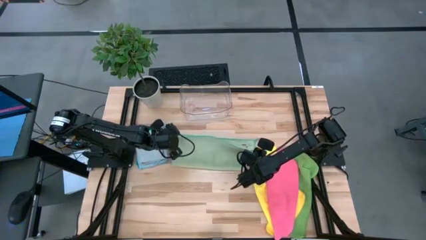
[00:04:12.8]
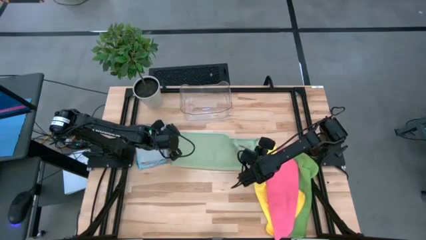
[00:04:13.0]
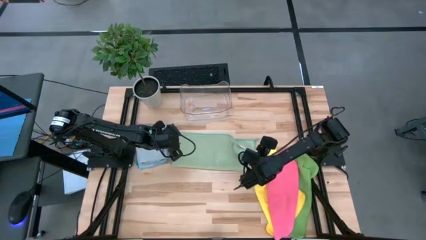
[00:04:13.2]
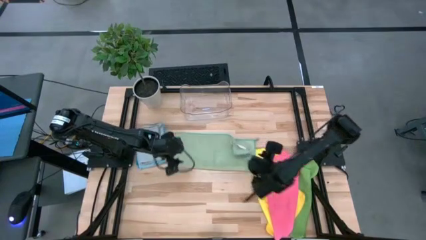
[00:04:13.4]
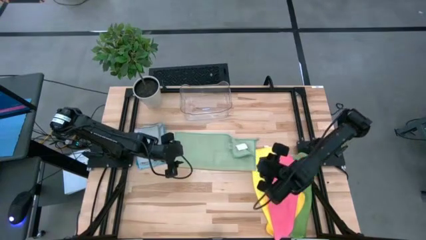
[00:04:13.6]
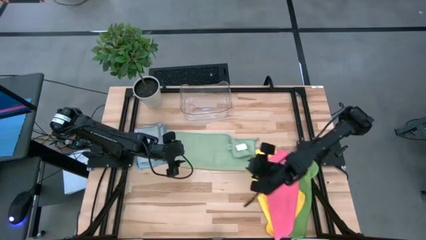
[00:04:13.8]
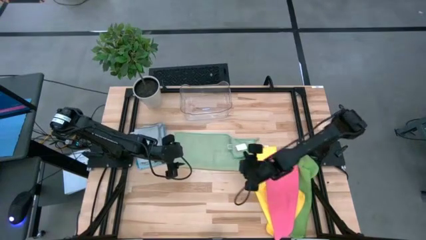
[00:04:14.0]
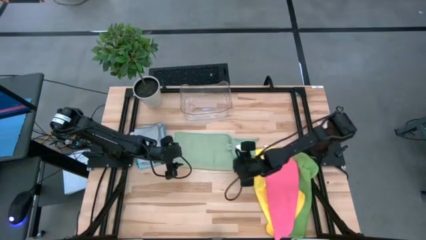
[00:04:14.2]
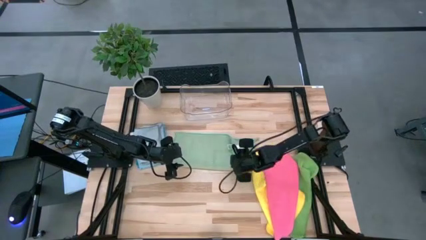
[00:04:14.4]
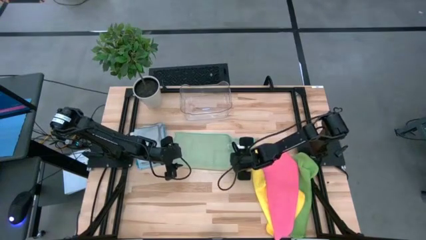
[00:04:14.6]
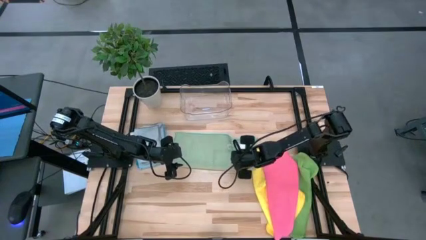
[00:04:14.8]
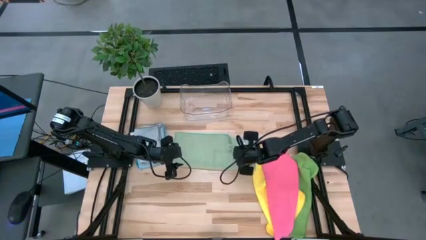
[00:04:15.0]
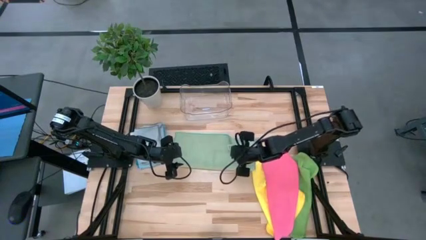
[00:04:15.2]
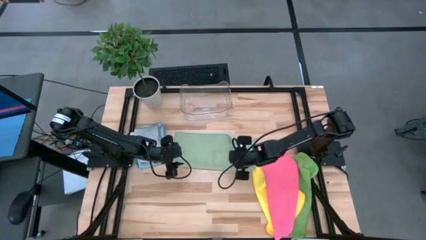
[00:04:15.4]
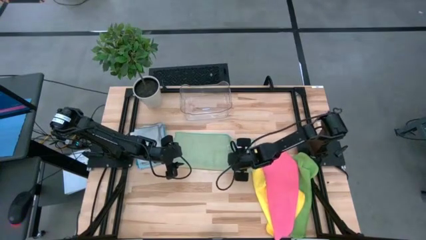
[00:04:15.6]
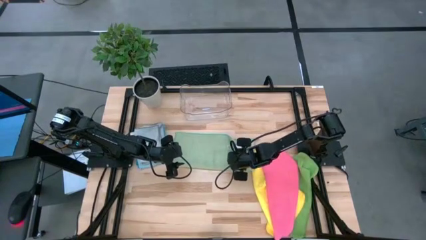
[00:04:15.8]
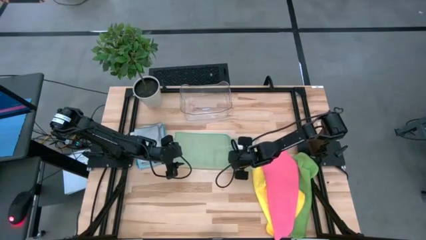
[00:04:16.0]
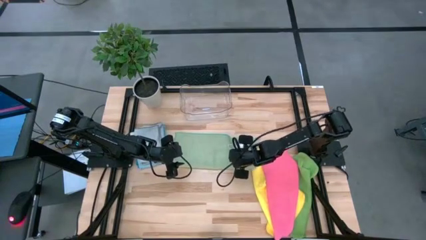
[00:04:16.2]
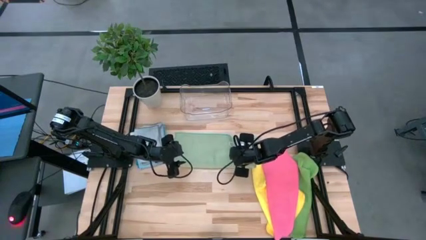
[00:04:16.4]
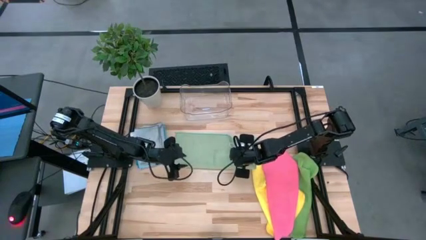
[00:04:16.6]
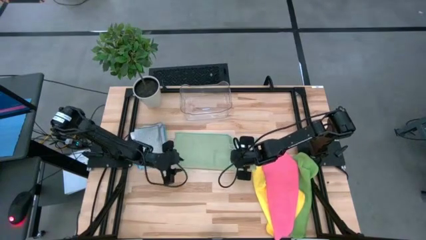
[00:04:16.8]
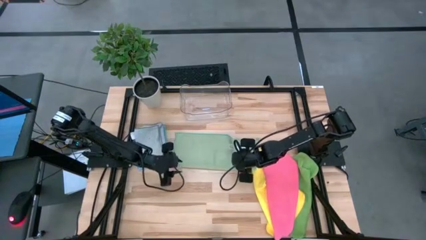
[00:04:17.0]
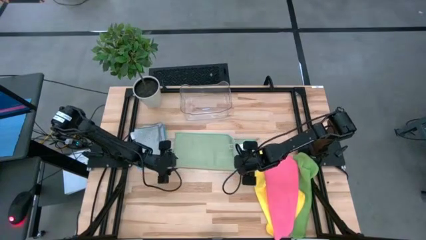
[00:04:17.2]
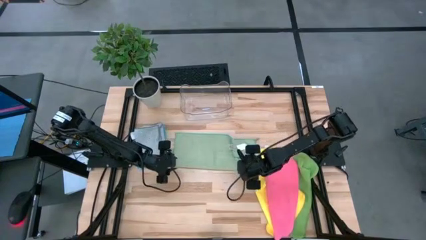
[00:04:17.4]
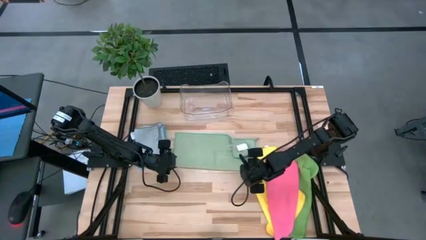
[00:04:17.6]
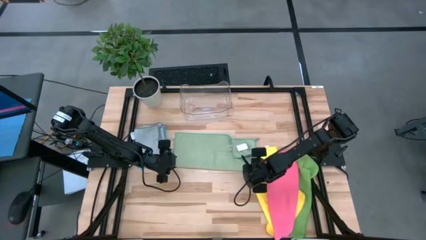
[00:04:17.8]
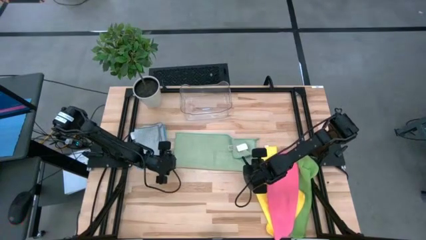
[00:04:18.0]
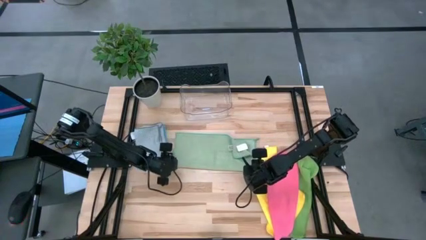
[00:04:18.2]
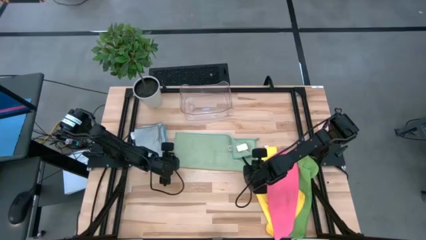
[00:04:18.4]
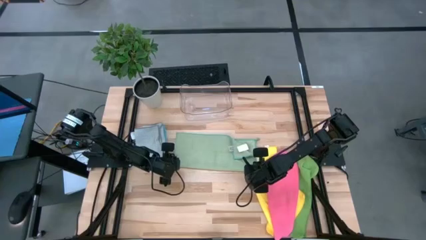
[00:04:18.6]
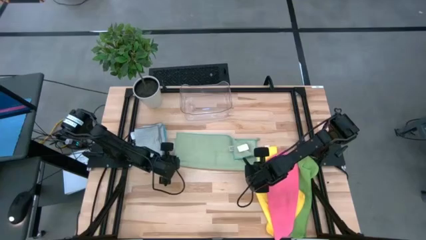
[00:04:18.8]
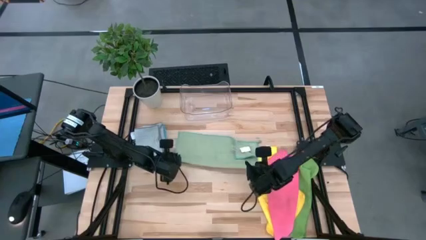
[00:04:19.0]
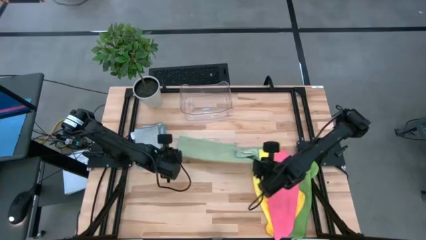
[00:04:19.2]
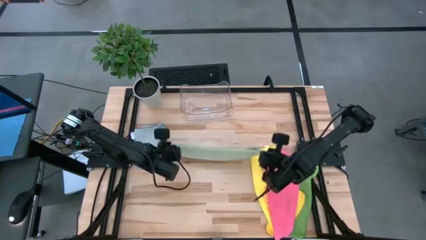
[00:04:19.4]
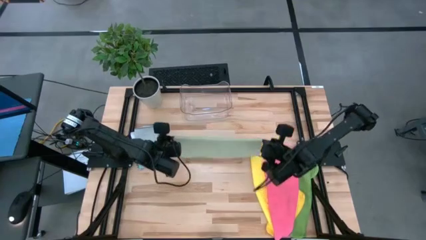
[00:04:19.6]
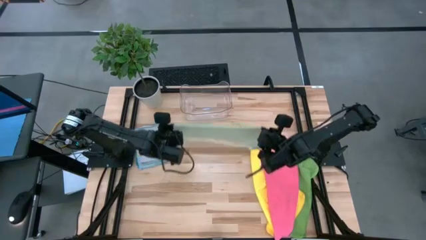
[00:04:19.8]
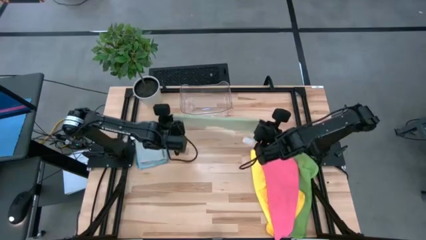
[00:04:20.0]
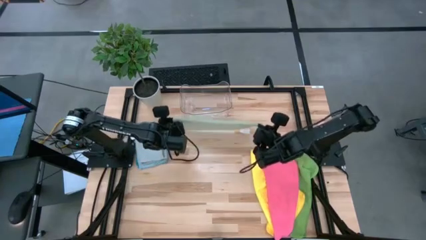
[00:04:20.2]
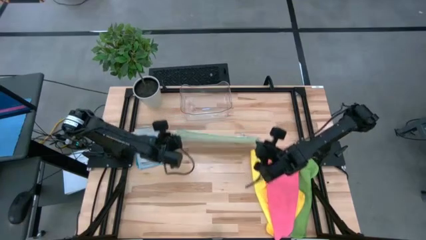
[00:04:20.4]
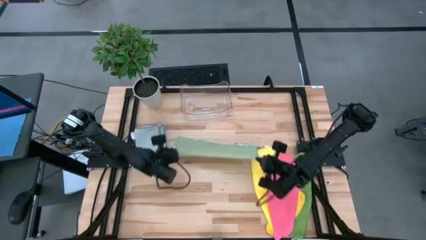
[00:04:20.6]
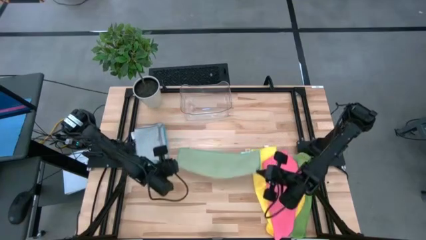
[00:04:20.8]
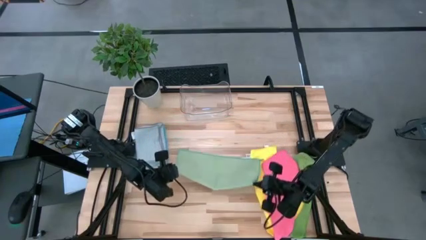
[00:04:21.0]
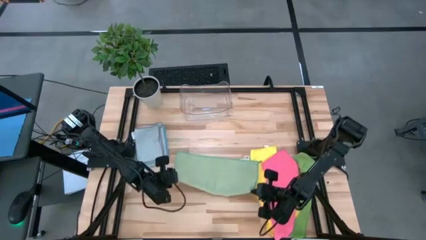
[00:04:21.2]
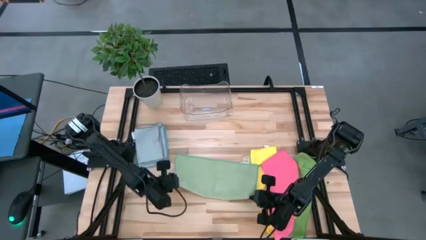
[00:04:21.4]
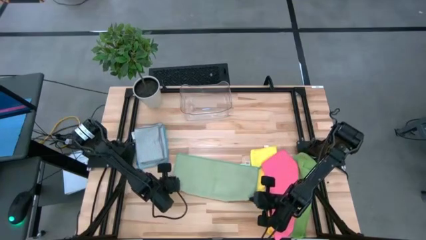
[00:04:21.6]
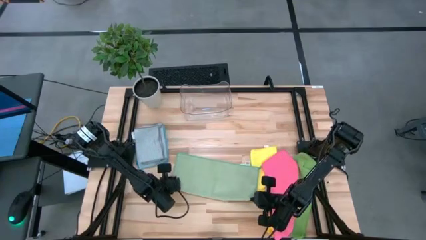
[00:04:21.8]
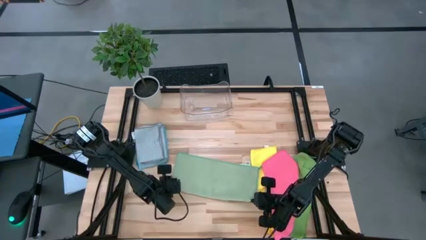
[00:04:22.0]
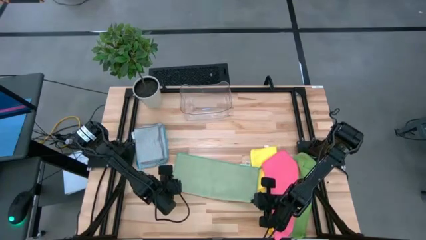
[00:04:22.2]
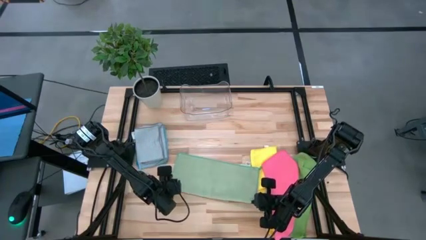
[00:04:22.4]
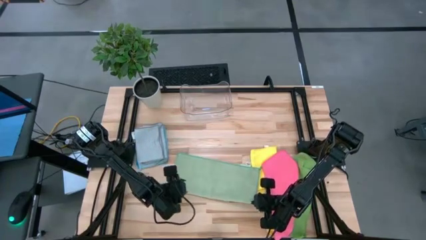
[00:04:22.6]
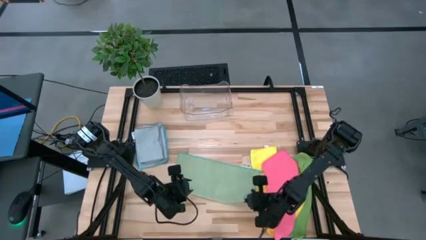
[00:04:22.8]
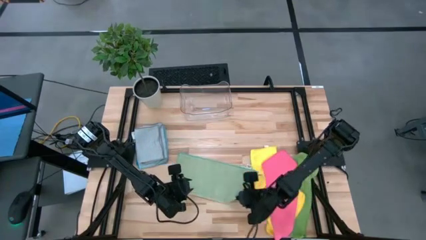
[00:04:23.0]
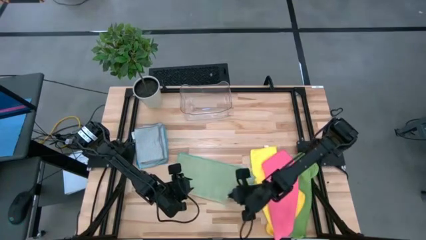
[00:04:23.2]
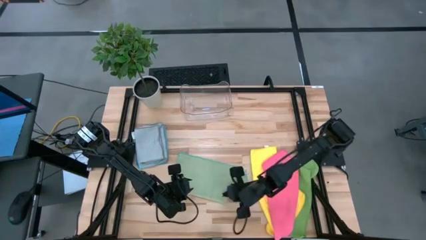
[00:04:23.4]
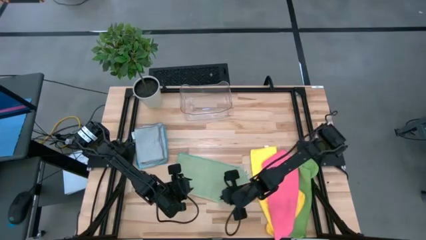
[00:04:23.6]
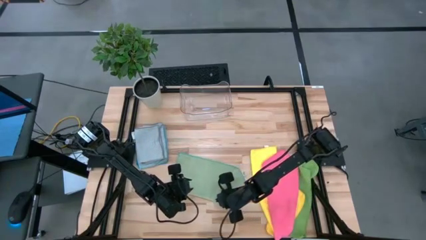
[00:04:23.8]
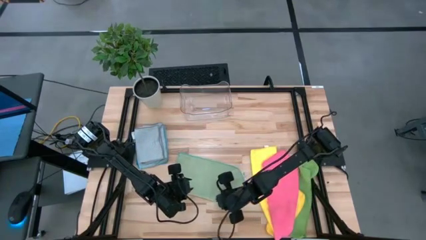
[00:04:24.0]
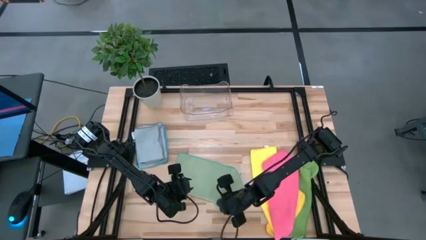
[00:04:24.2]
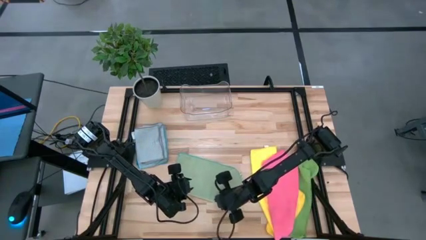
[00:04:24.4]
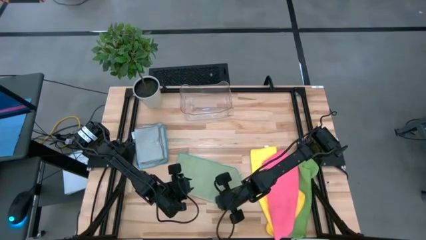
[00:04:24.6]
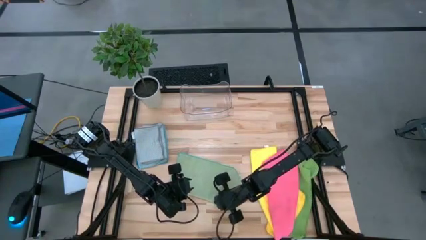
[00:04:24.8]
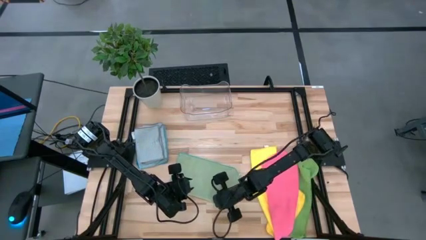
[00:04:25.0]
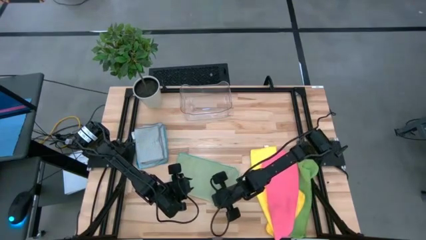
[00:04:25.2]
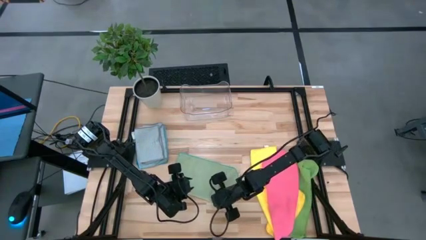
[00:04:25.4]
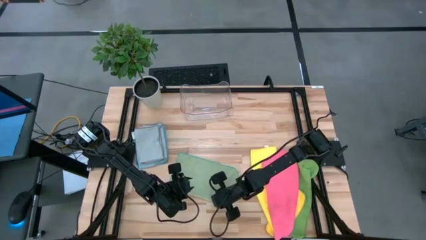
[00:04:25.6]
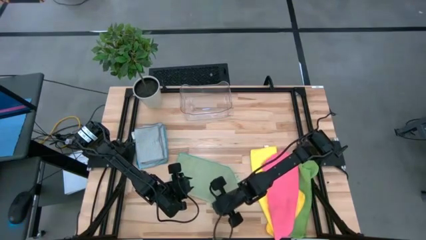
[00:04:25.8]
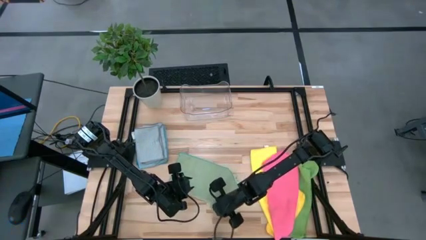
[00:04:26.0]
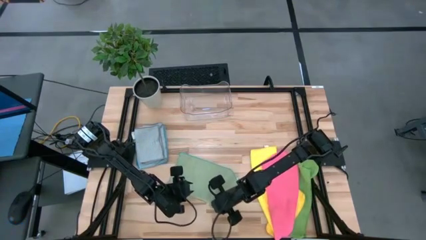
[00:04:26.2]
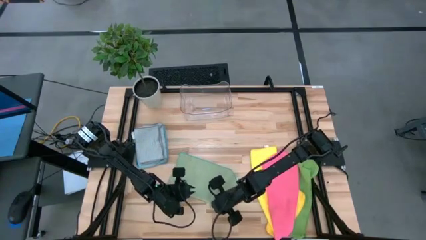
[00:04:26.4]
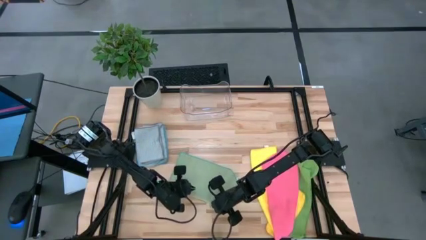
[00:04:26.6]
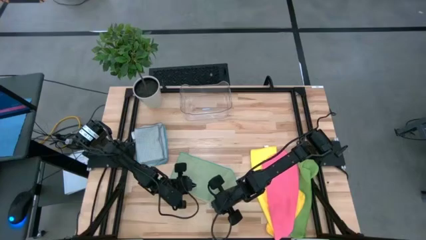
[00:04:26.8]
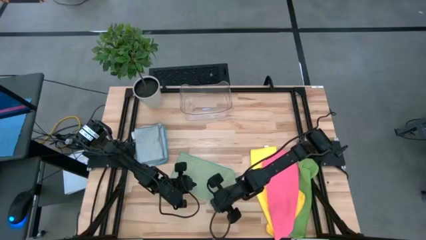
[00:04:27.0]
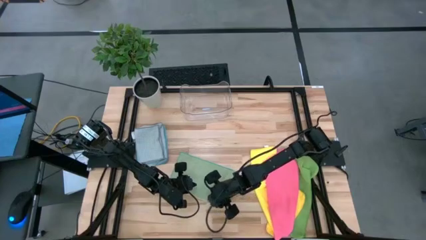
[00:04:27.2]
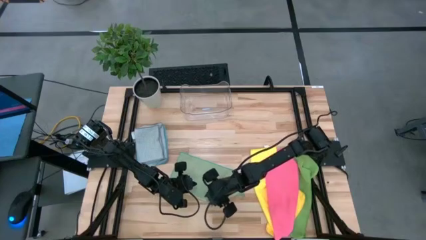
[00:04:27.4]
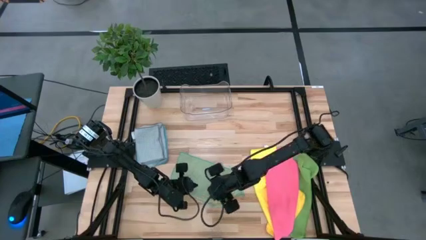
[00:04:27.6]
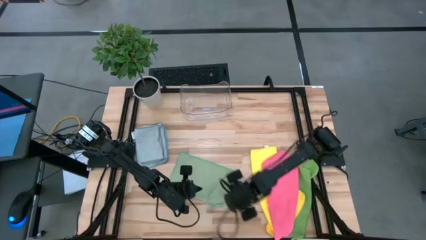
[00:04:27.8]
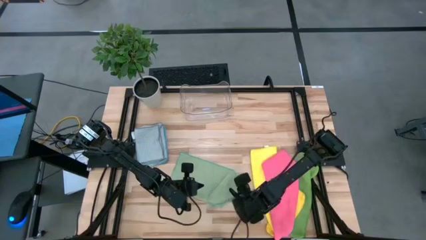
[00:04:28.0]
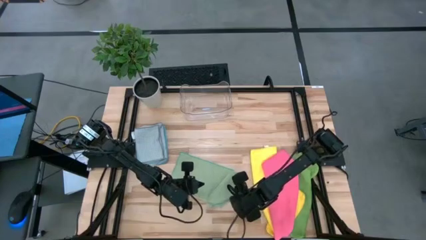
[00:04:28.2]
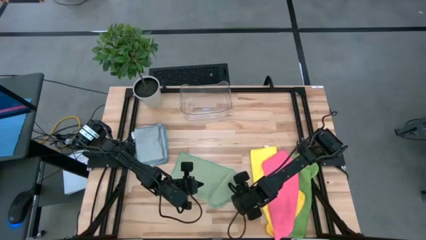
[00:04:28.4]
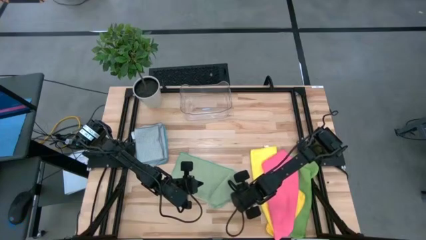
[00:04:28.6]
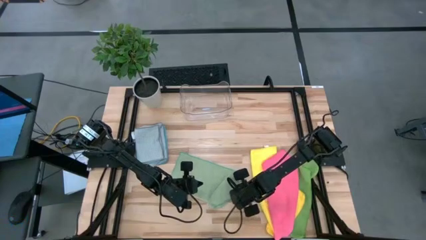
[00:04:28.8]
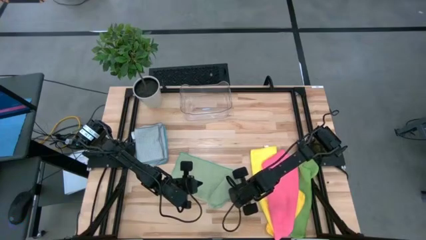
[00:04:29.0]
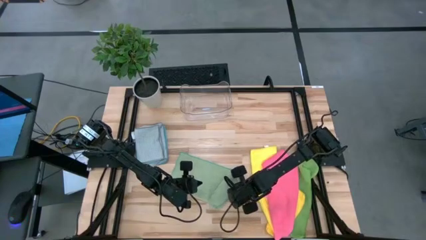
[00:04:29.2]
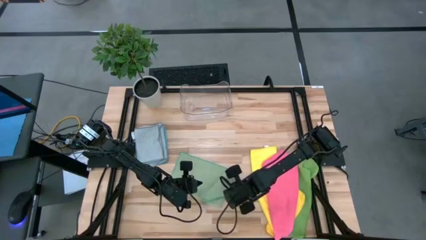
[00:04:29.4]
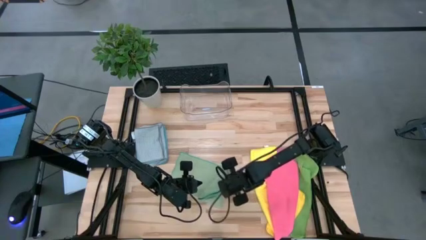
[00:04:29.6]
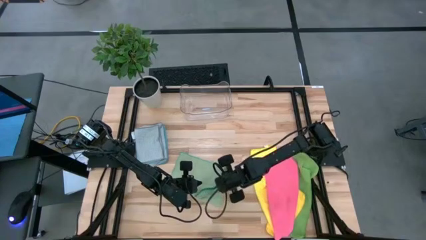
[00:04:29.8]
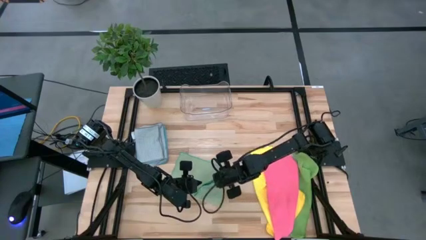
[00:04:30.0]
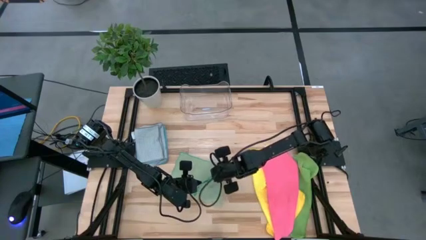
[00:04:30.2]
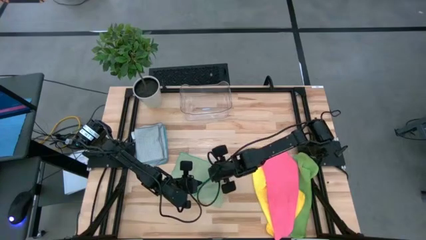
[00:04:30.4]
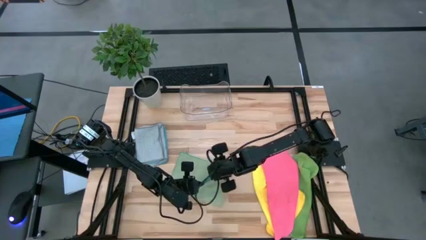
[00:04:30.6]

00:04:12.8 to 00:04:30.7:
Task: Fold microfiber towels
Fold the light green microfiber cloth
